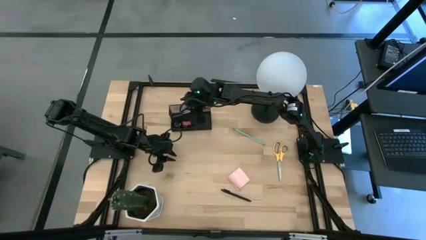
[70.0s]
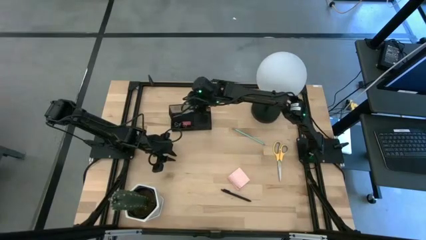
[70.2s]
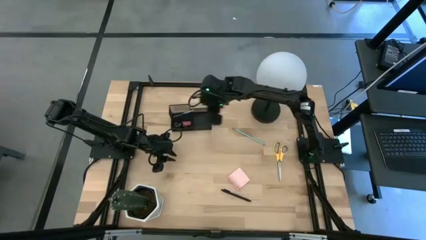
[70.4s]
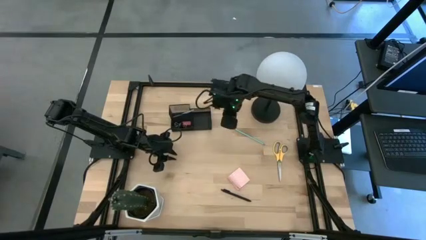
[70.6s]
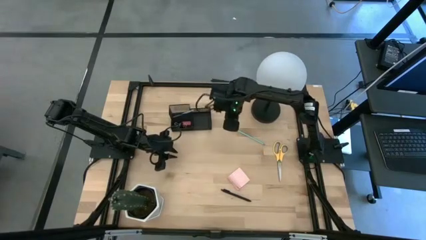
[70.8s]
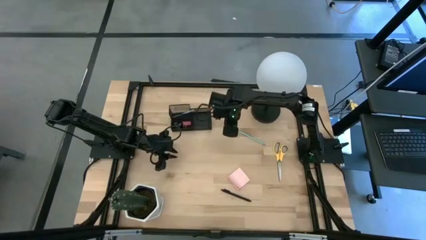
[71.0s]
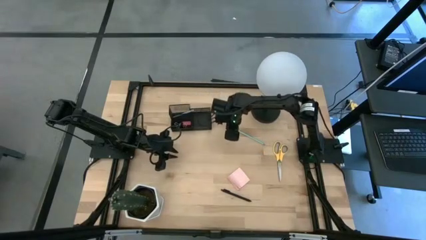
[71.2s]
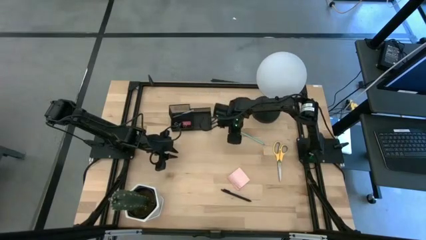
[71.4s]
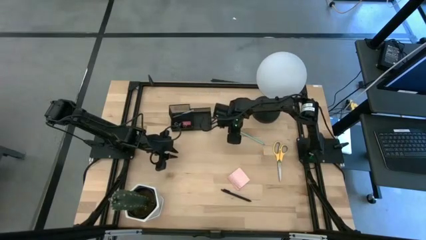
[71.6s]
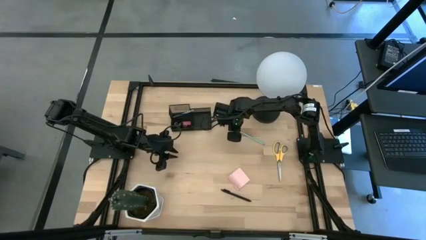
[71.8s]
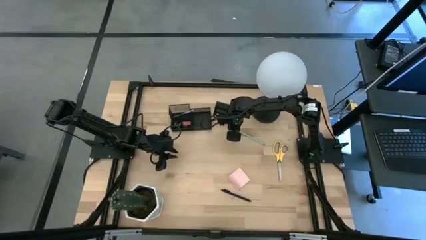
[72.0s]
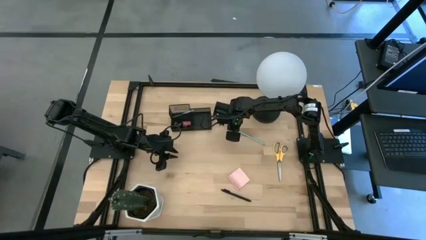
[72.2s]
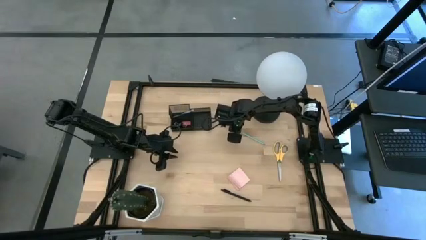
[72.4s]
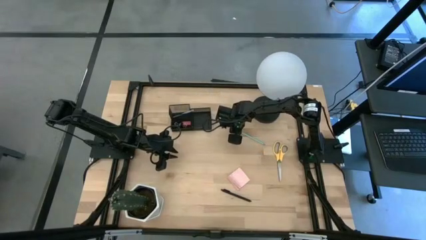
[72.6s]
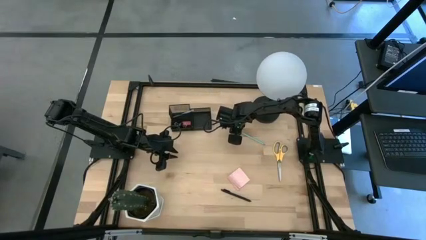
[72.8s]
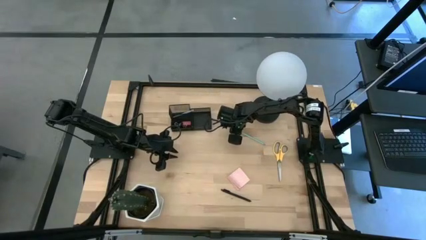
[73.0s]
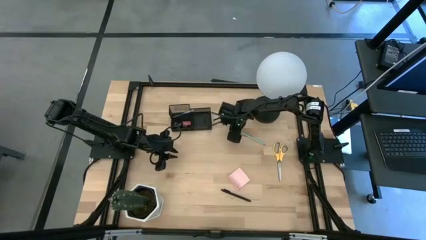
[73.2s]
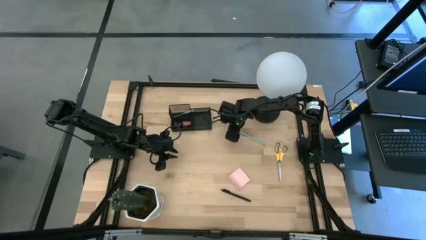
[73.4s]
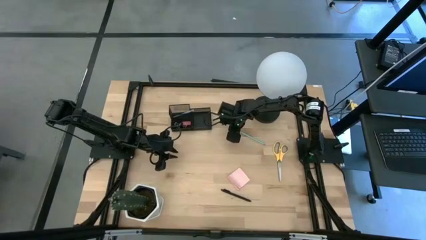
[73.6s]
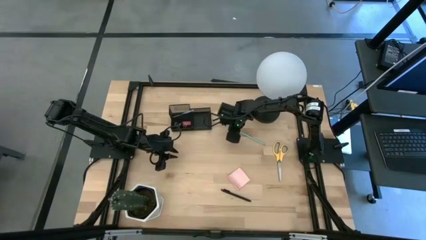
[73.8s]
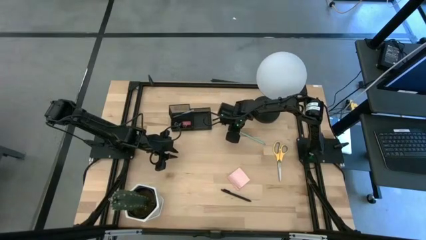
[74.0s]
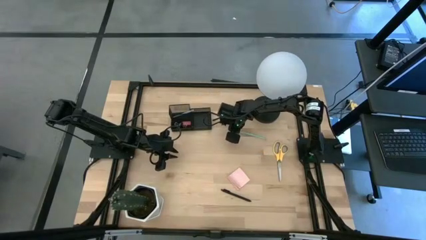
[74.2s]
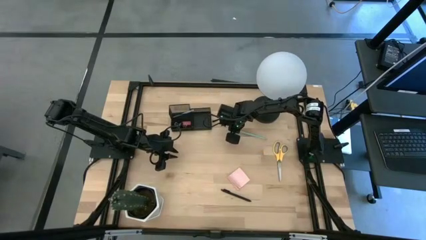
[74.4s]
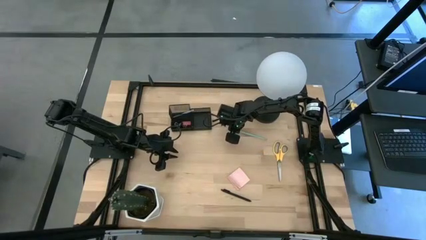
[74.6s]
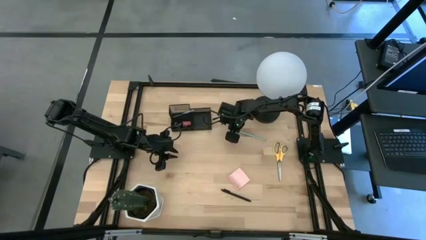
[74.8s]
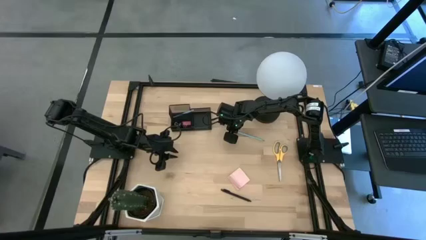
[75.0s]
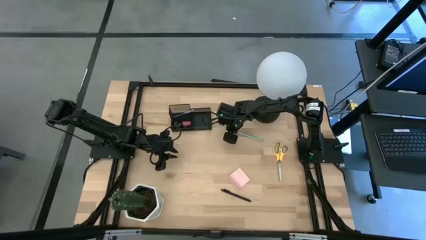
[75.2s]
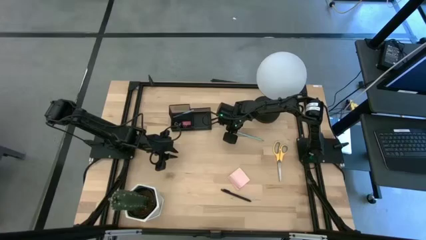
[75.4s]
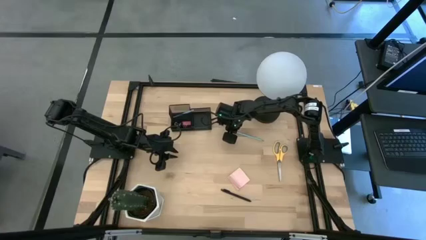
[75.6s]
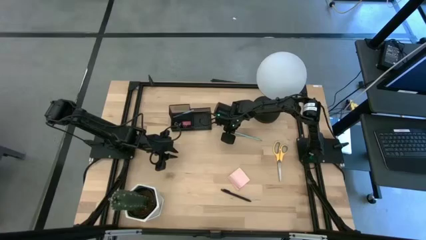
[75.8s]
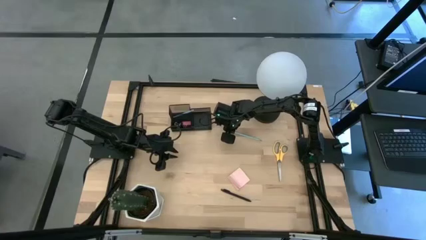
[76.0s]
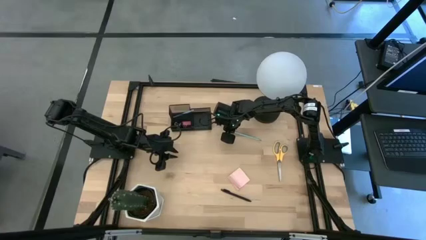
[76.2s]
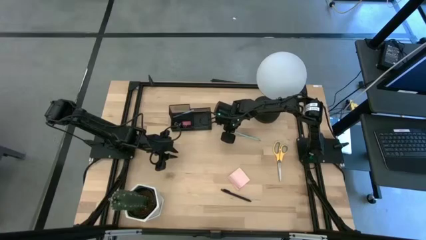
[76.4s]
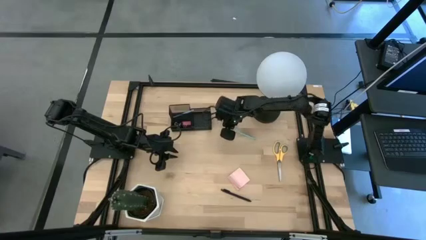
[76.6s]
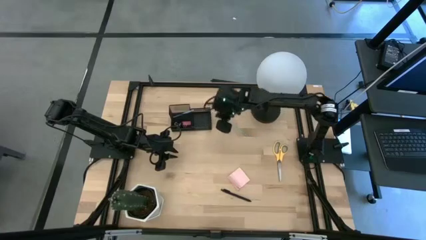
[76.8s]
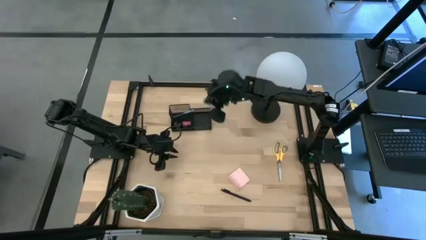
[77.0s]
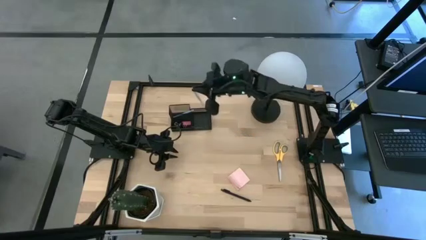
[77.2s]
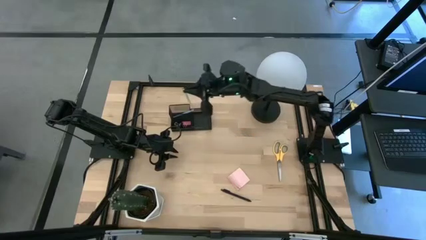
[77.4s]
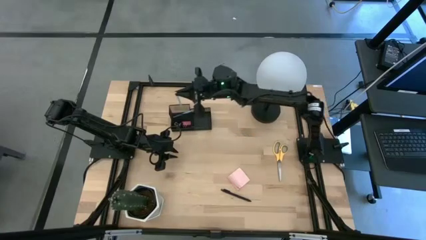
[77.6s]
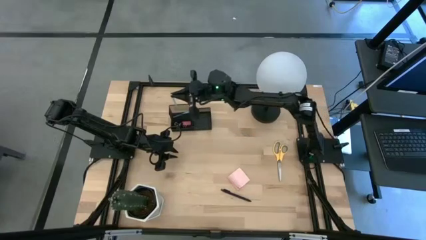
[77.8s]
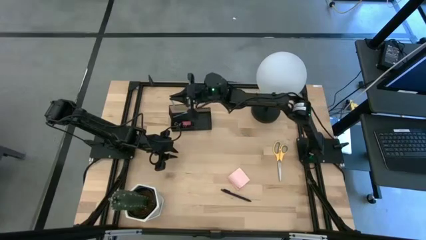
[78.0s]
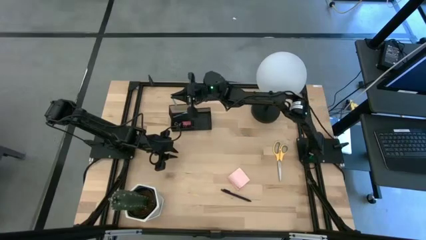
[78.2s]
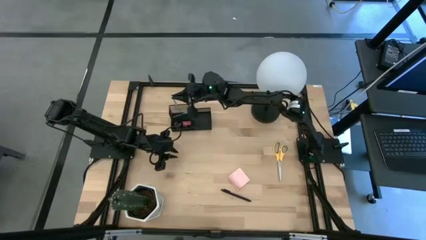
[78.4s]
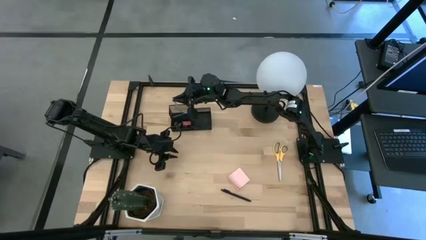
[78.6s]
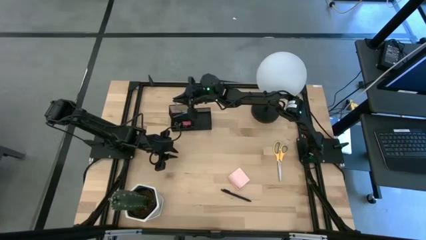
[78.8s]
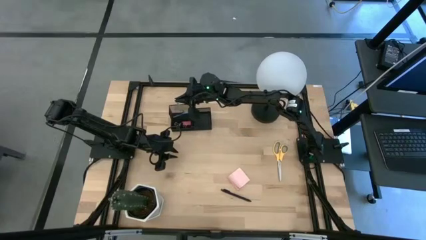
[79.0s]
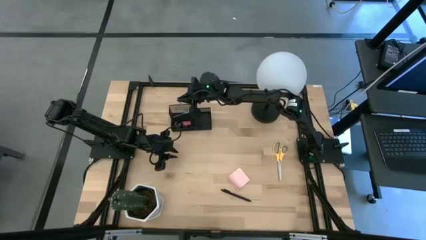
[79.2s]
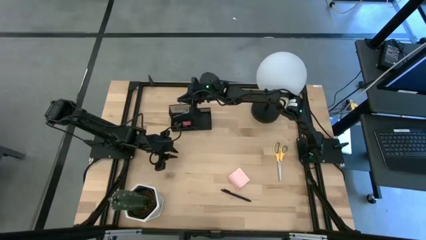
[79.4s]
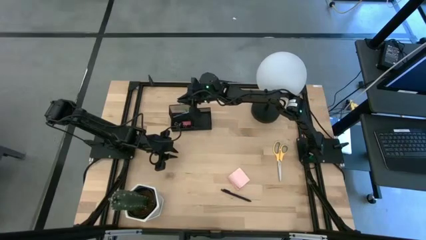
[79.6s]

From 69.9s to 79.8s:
Task: Pick and place office supplies into organizer
Put the light blue pencil into the desk organizer

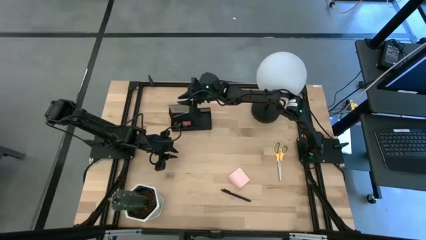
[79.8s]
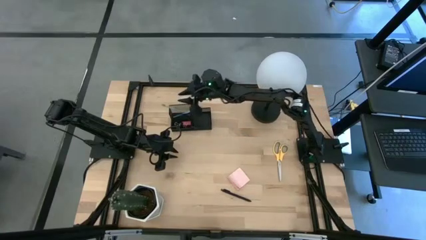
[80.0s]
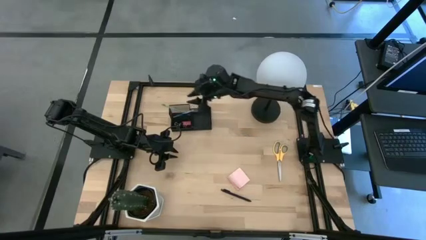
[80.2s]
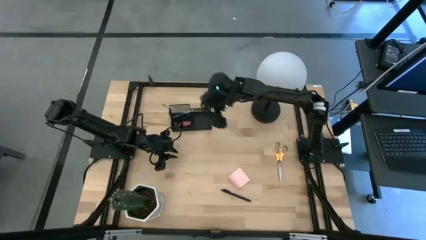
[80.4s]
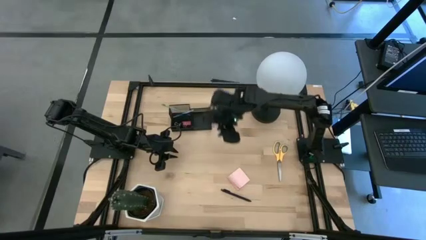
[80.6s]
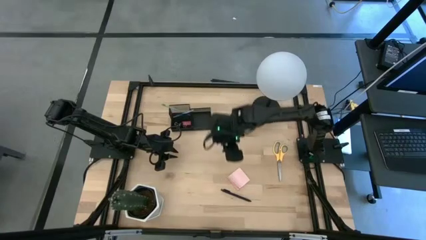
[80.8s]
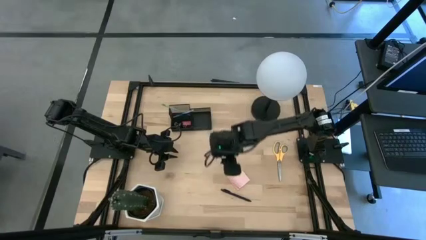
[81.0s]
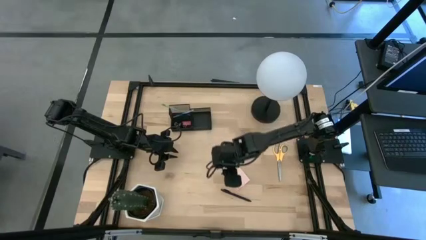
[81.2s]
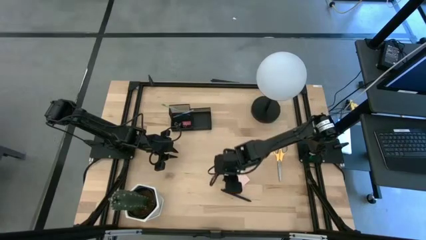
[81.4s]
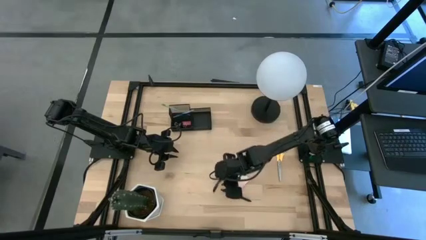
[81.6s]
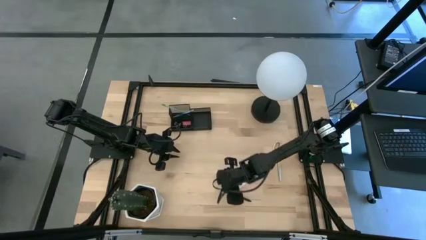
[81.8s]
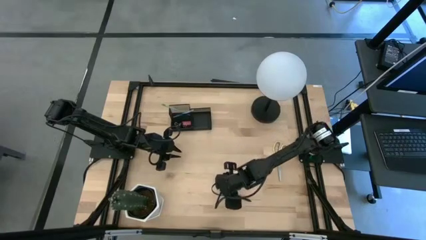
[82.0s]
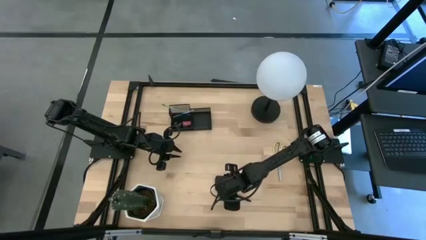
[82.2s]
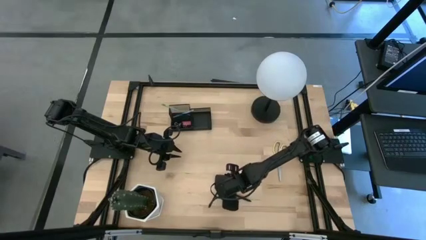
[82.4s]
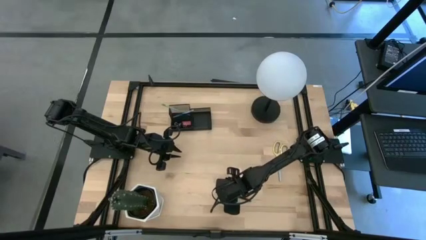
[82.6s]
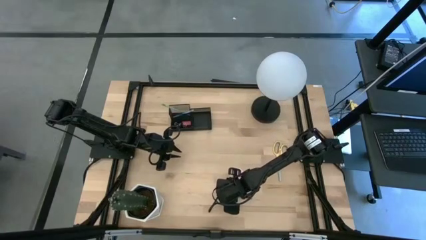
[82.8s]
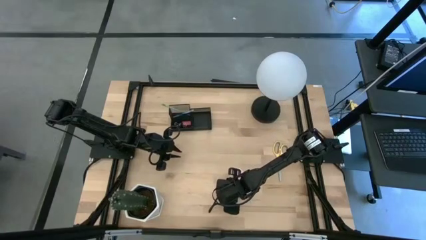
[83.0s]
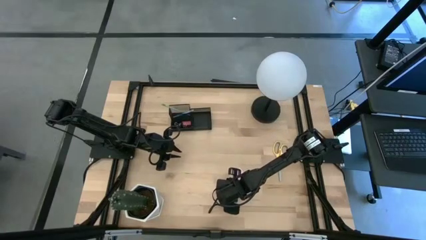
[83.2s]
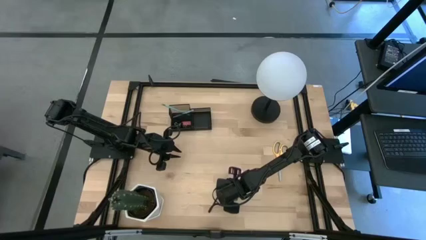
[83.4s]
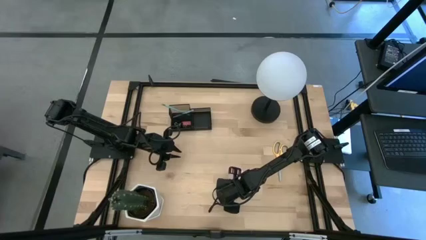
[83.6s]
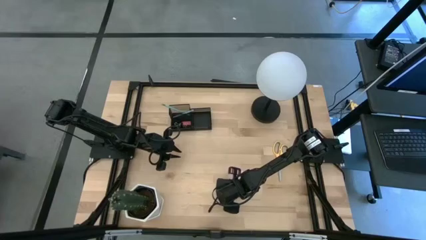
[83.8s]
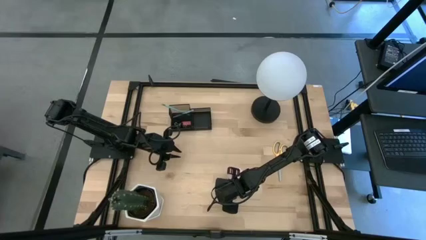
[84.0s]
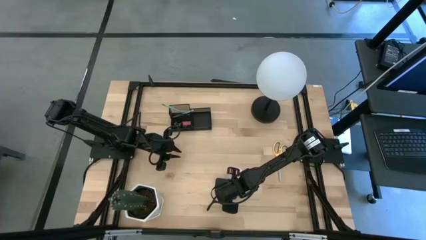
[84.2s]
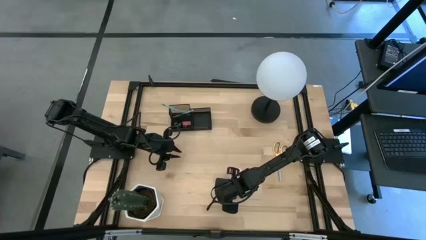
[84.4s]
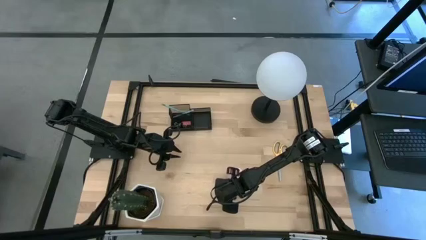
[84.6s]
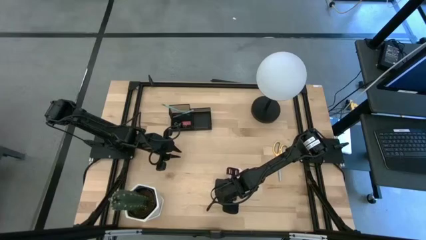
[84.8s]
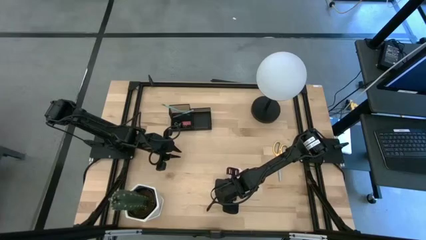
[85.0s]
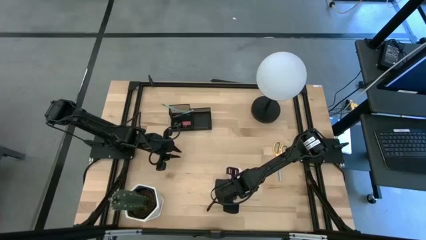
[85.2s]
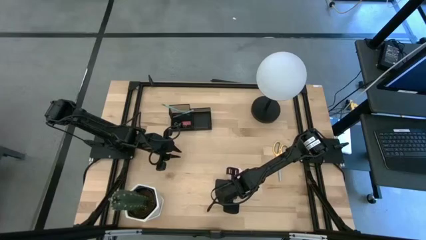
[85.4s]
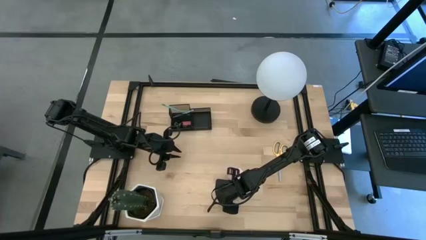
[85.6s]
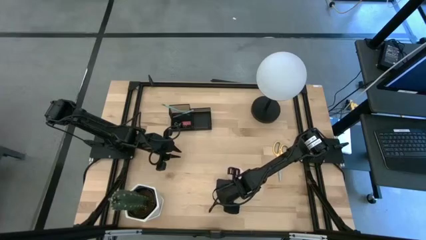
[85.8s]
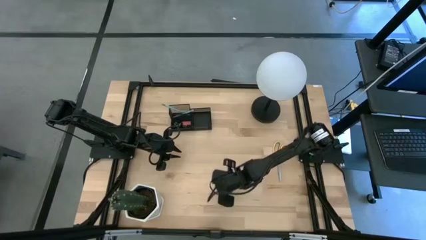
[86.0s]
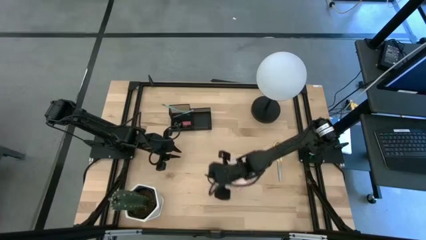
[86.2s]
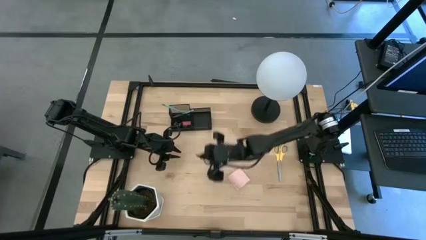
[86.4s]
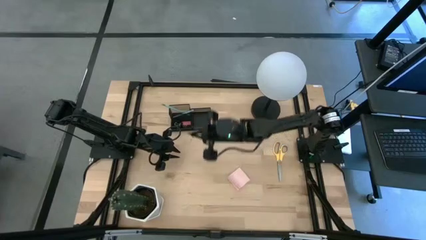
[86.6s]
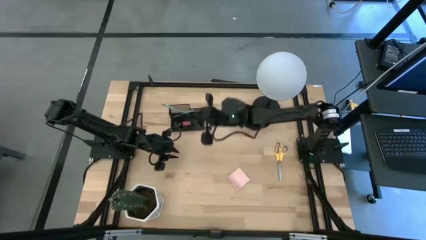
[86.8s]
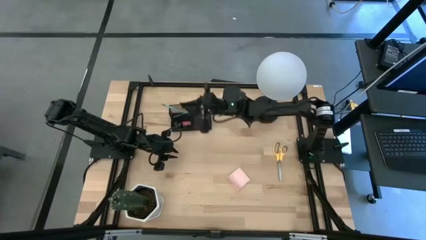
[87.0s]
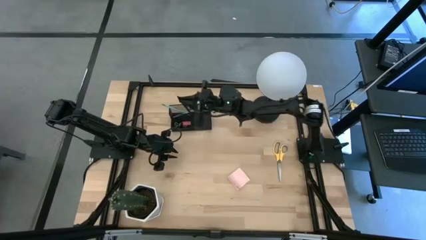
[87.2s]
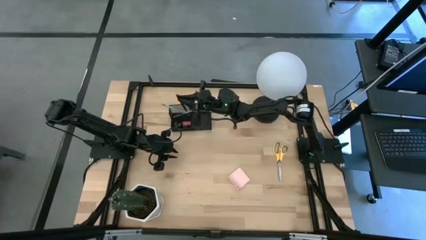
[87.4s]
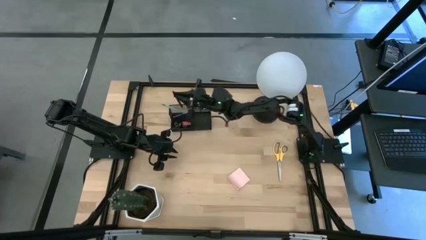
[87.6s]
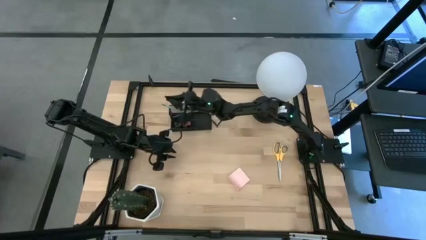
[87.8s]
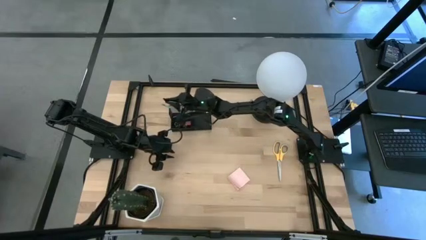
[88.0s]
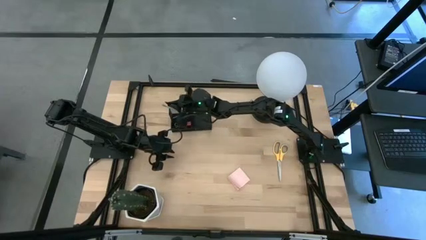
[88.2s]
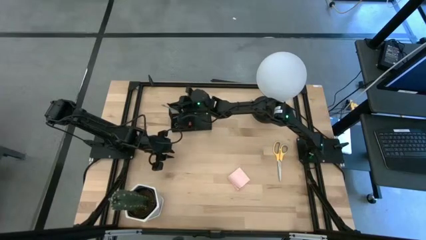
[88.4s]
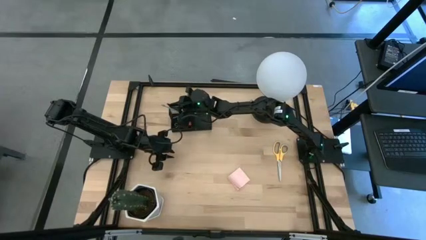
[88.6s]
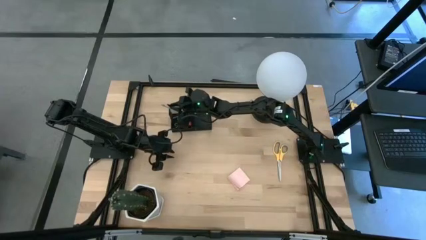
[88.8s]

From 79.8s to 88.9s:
Put the black pen into the desk organizer
